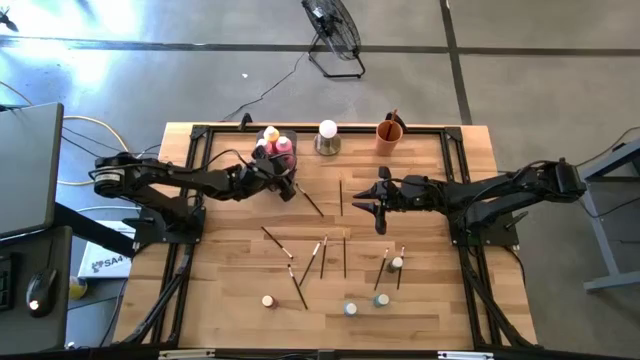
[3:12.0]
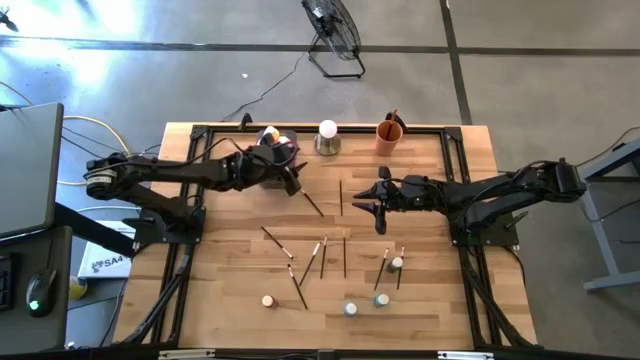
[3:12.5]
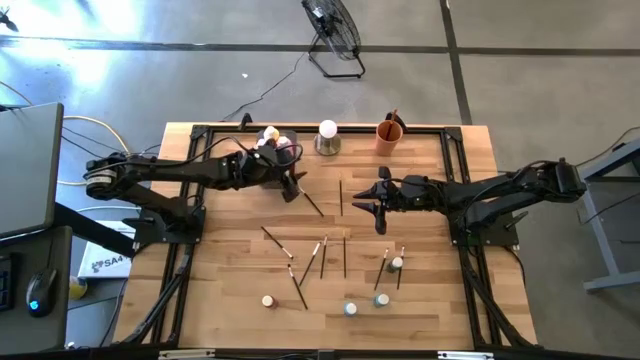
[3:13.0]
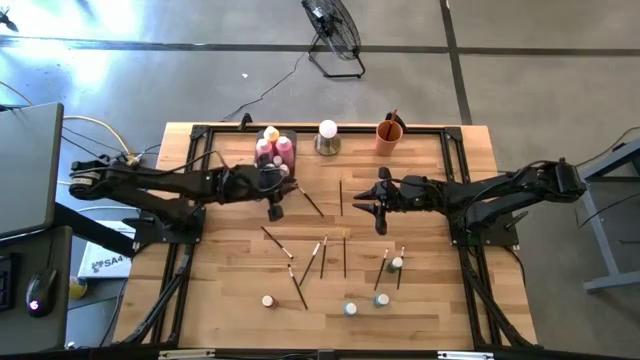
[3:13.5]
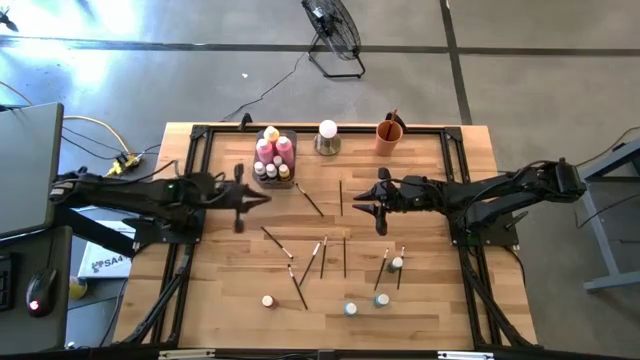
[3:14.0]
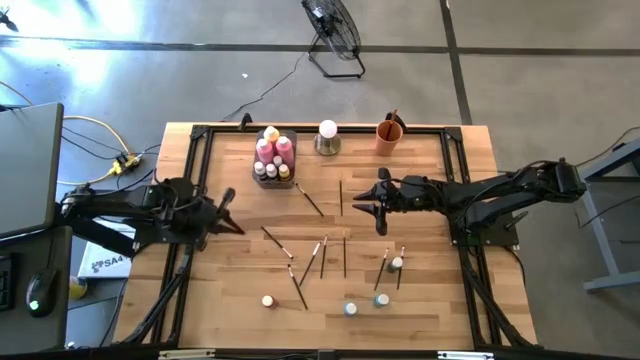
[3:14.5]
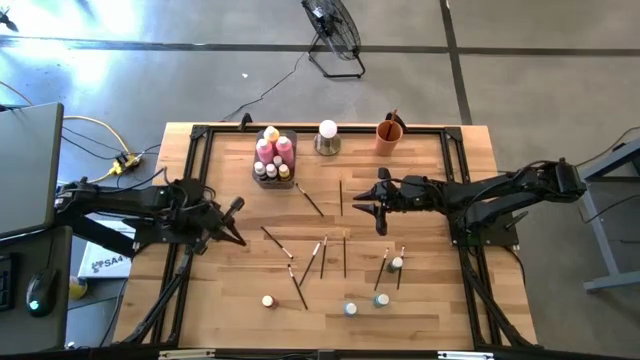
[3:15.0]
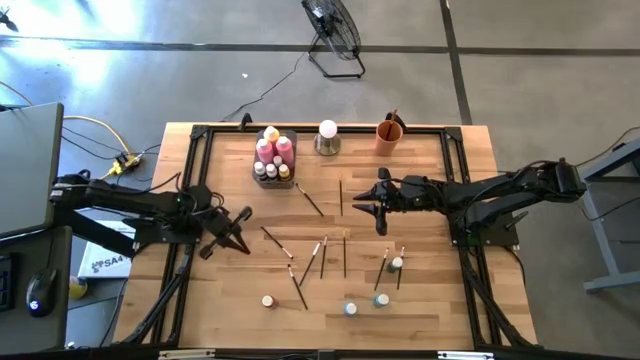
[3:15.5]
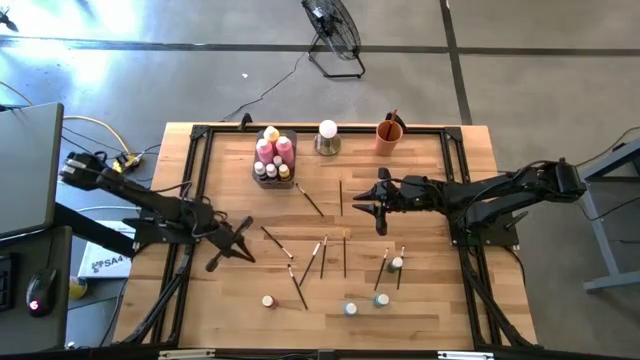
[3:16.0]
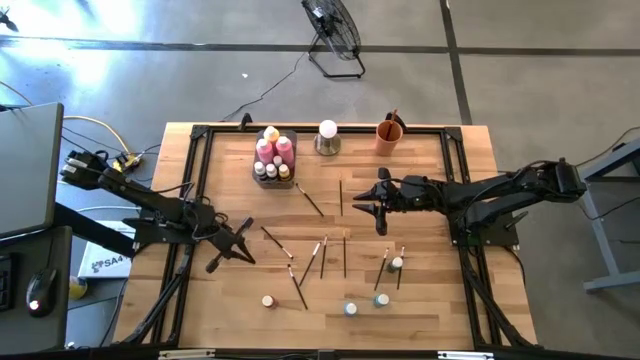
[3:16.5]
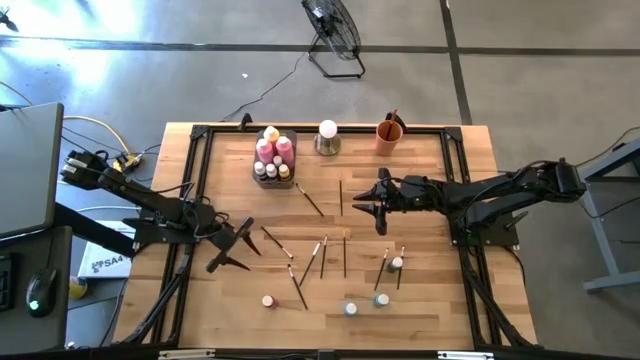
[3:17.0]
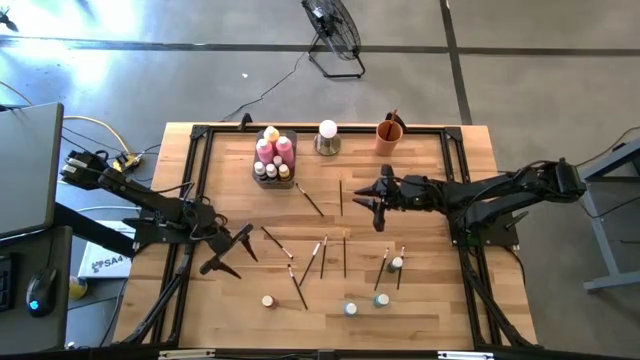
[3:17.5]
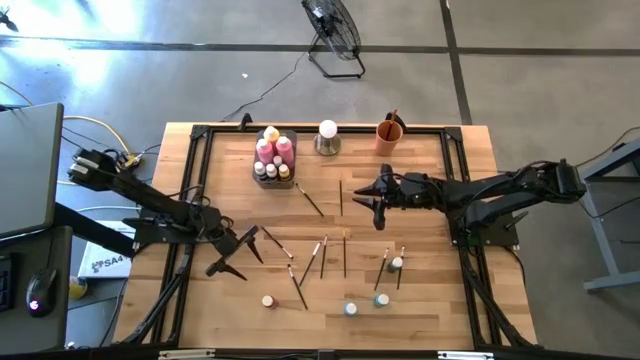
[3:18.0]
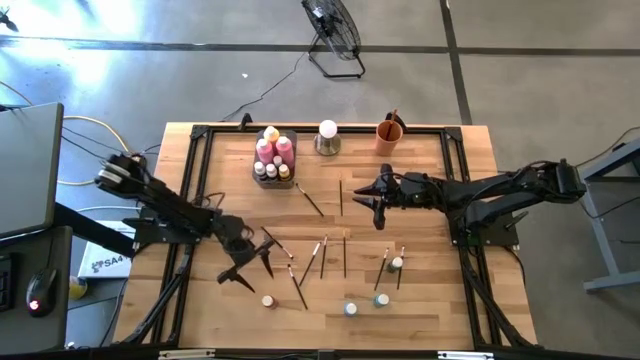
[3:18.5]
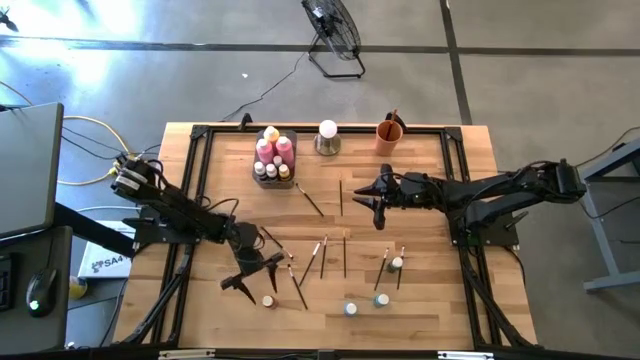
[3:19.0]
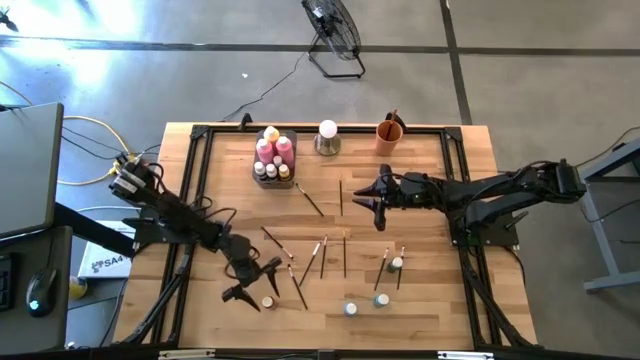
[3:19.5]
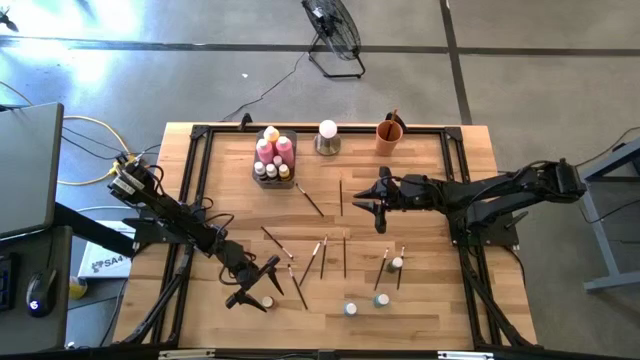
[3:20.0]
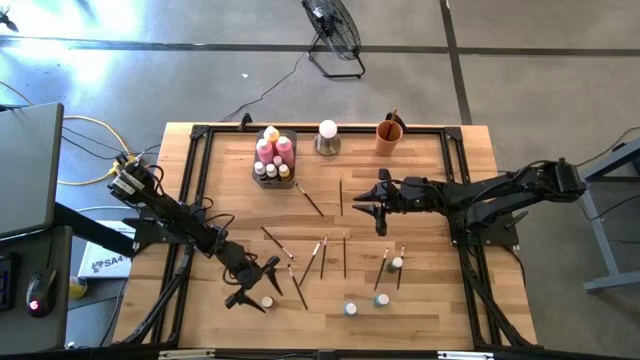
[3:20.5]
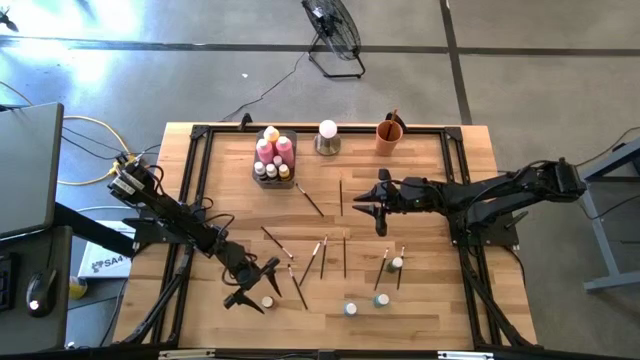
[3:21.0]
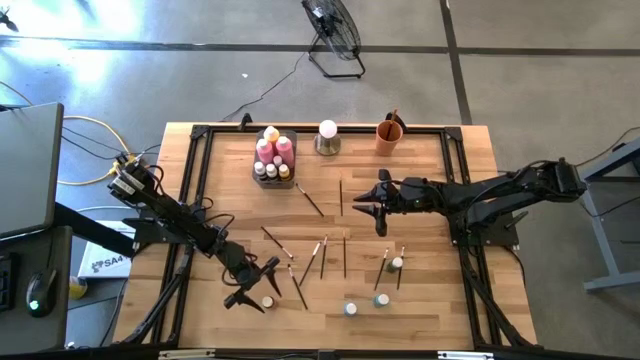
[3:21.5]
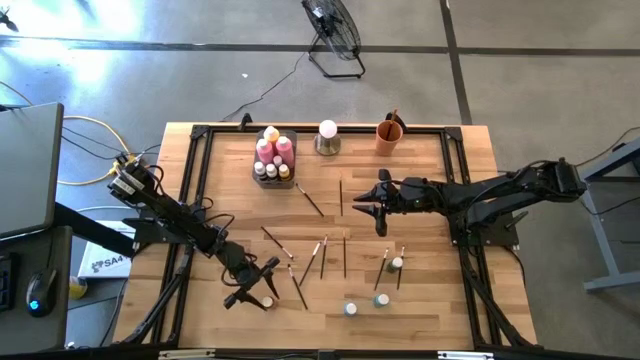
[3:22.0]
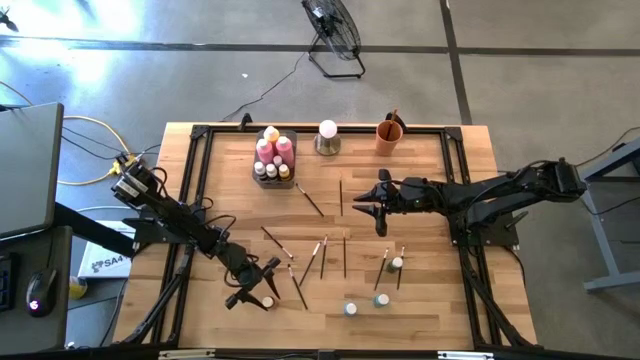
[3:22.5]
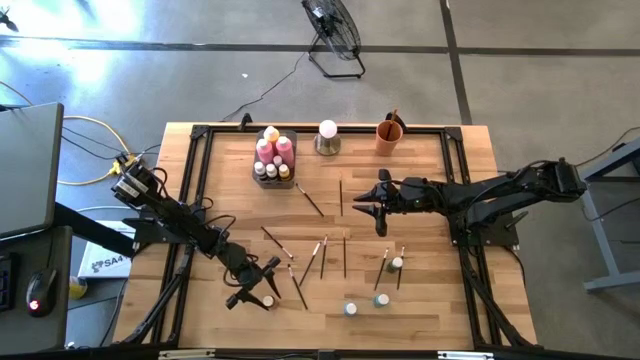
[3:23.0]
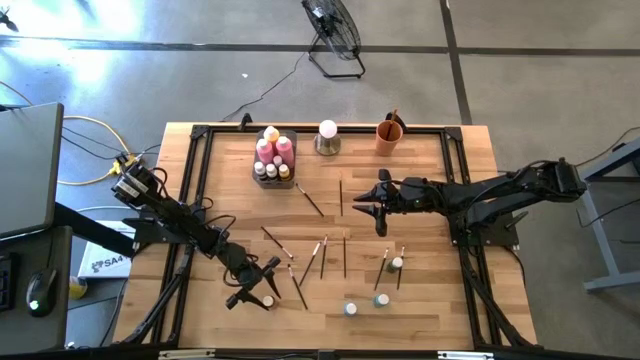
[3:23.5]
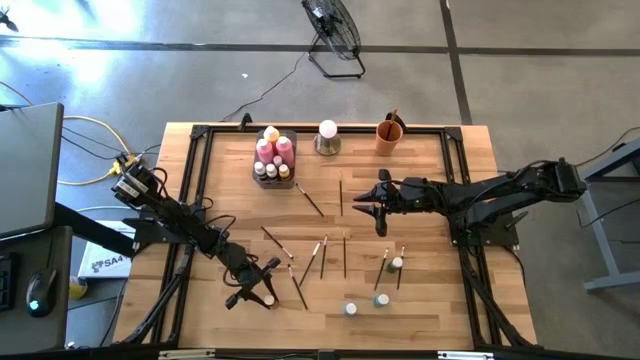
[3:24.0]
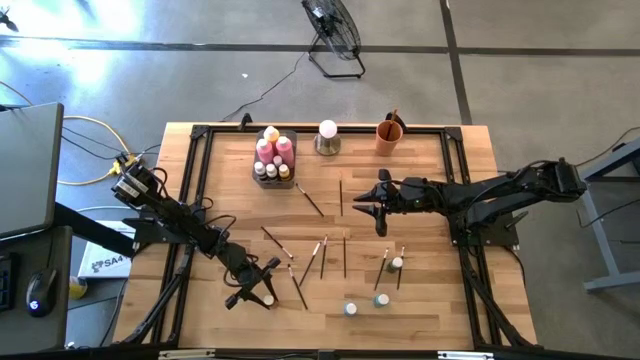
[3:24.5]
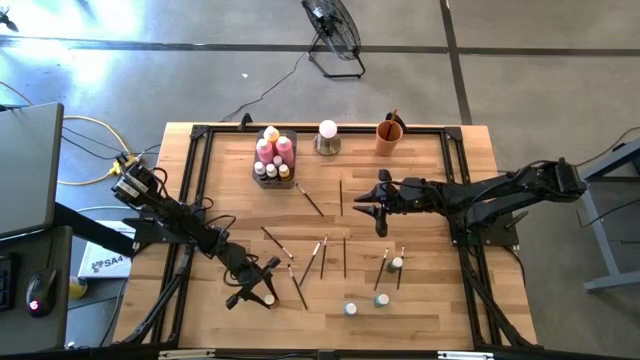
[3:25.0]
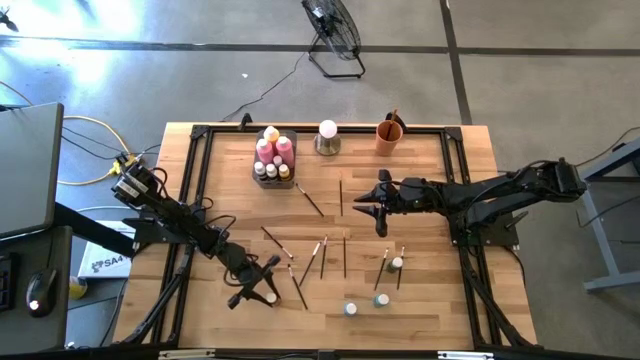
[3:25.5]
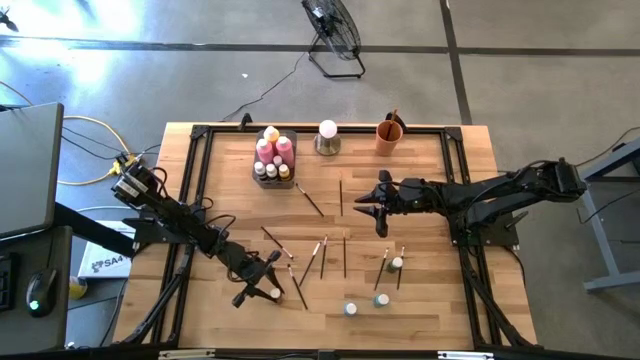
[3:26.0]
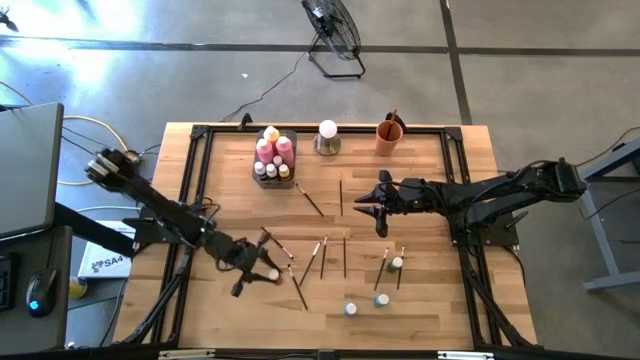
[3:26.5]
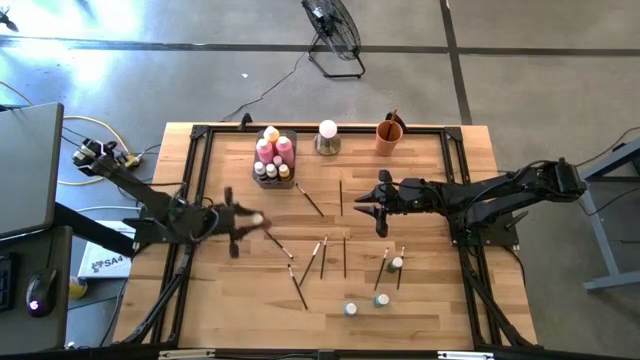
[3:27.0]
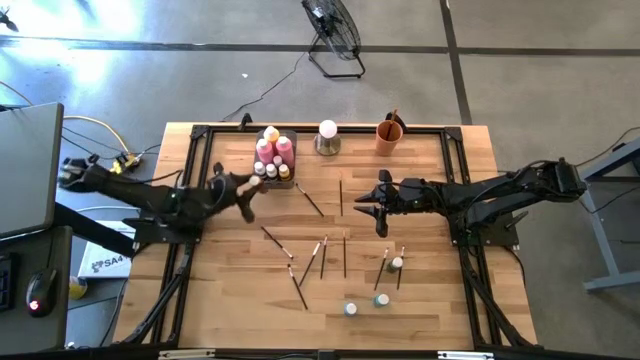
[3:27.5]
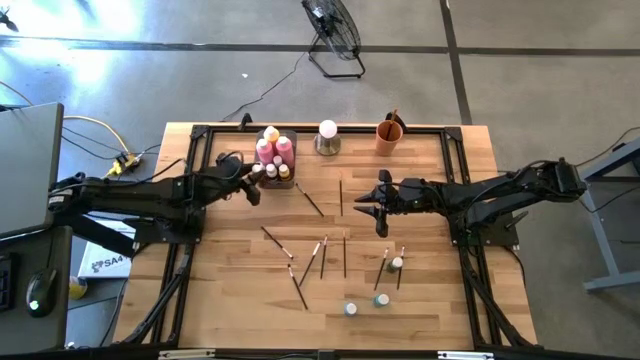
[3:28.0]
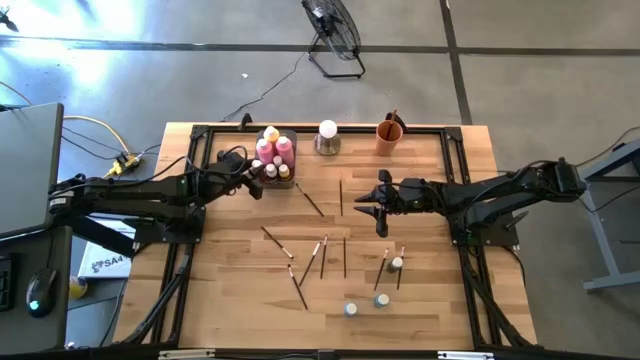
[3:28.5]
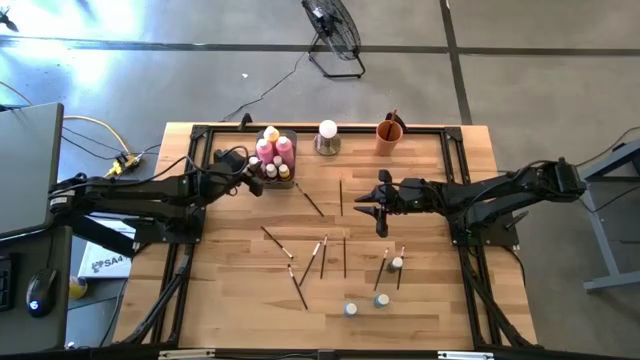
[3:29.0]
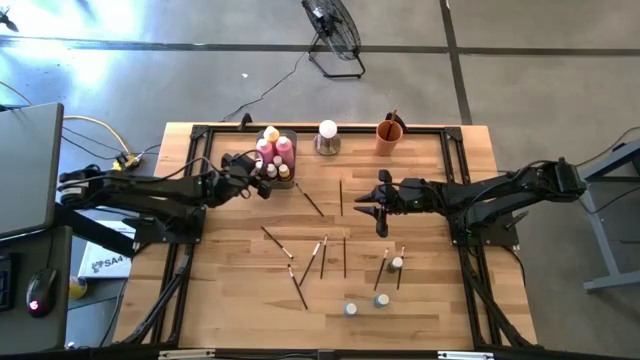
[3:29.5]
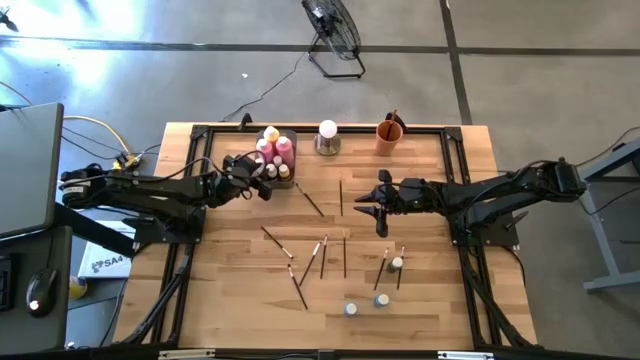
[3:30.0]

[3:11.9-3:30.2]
Task: Pick & Place Paint Supplies
Put the small red paint bottle into the gray bin

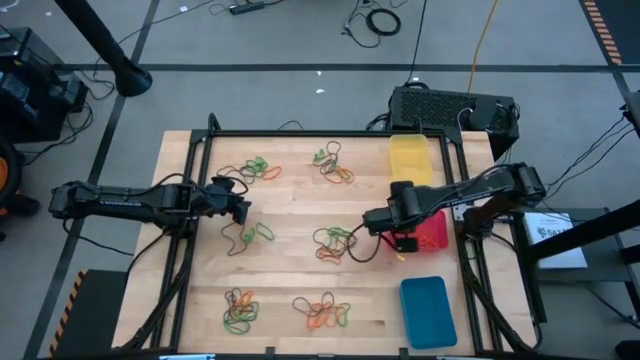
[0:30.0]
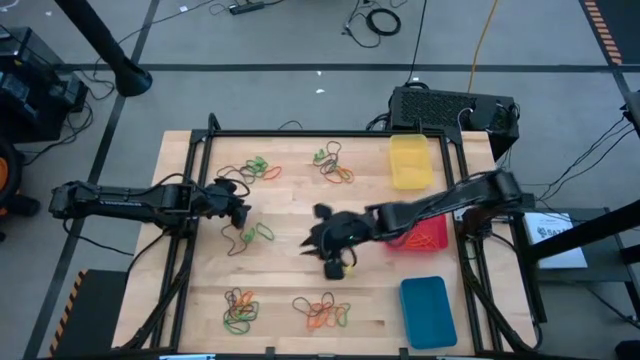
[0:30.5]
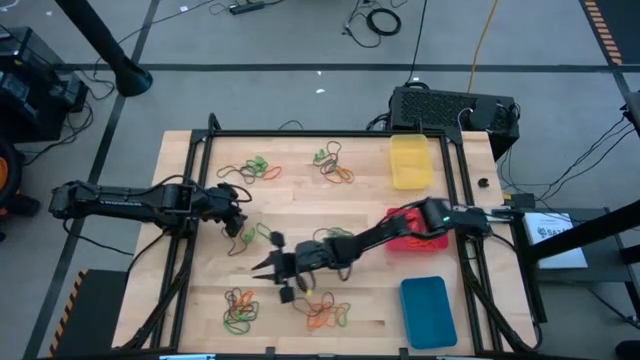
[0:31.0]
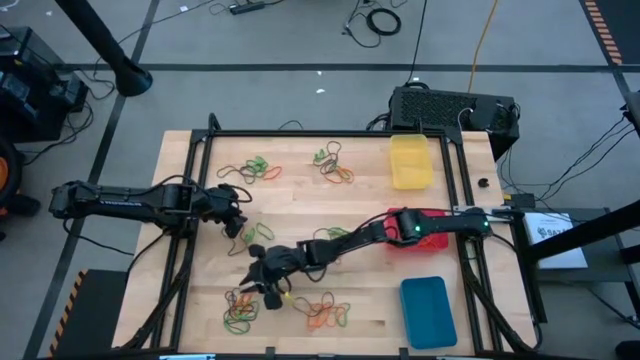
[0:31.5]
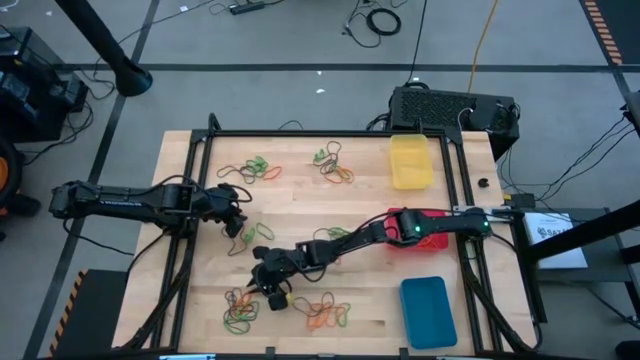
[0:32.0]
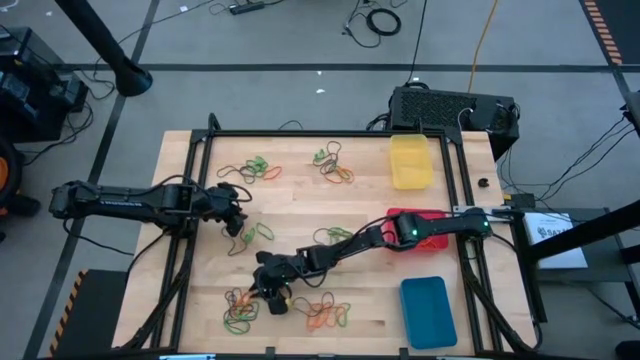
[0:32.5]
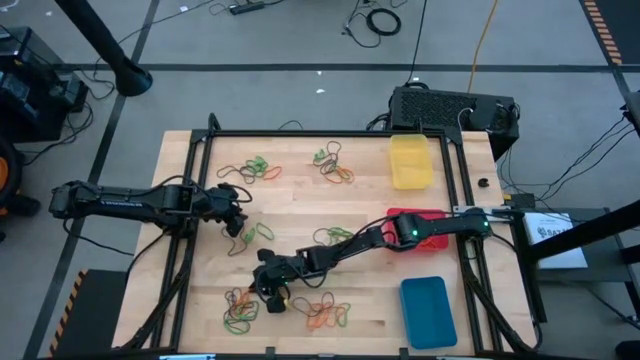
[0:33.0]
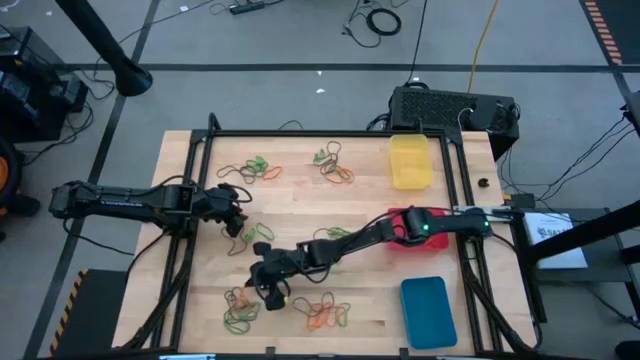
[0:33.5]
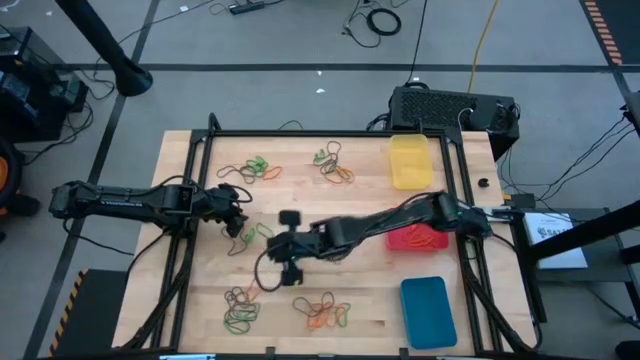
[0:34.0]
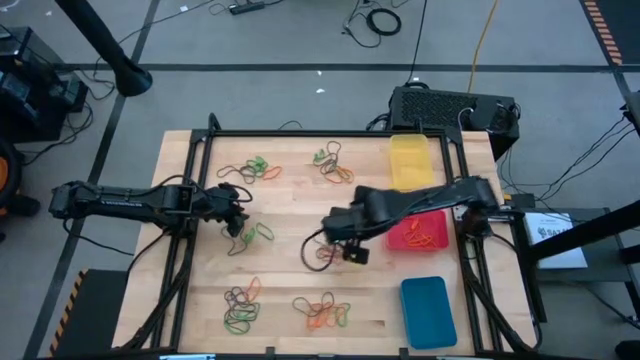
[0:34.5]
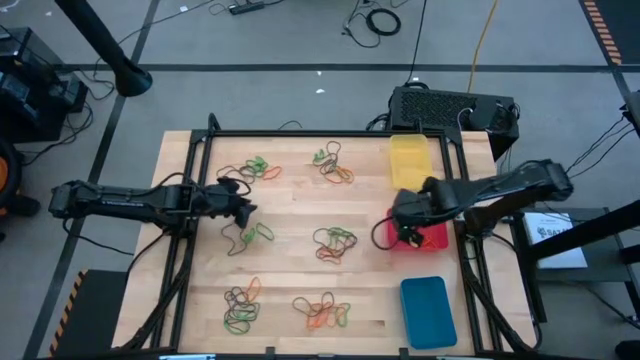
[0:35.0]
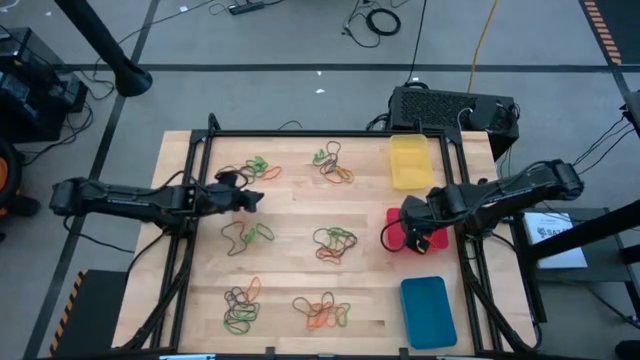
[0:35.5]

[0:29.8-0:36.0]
Task: Sort rubber bands into baskets
Put the orange rubber band into the red bin
